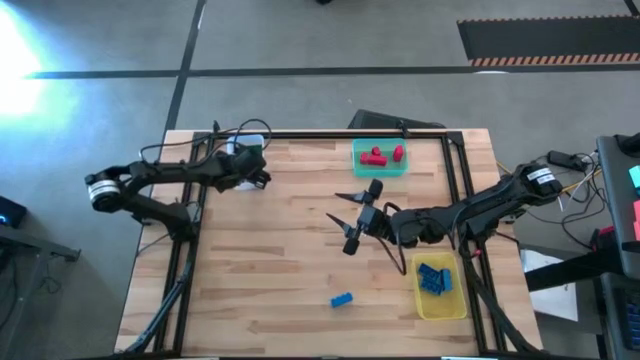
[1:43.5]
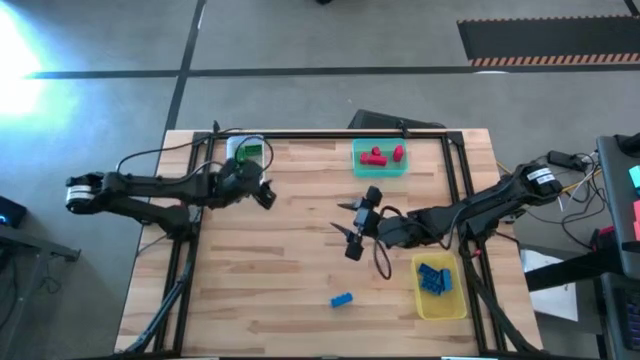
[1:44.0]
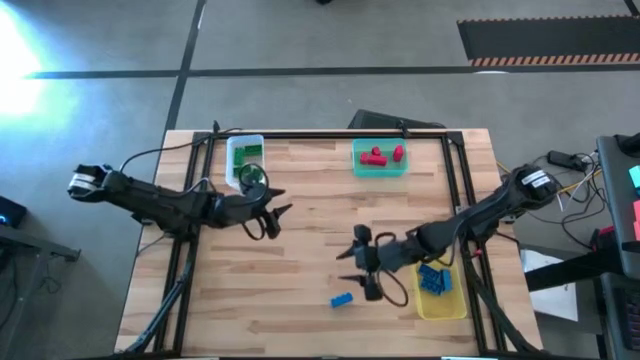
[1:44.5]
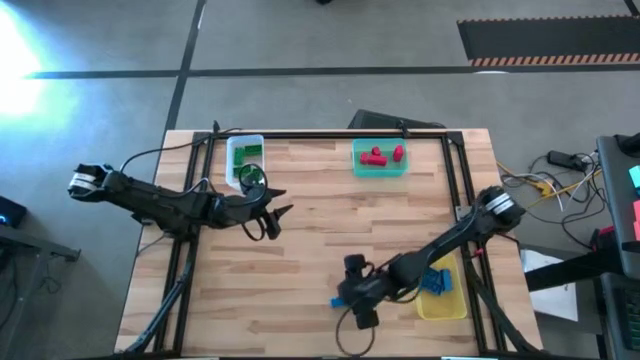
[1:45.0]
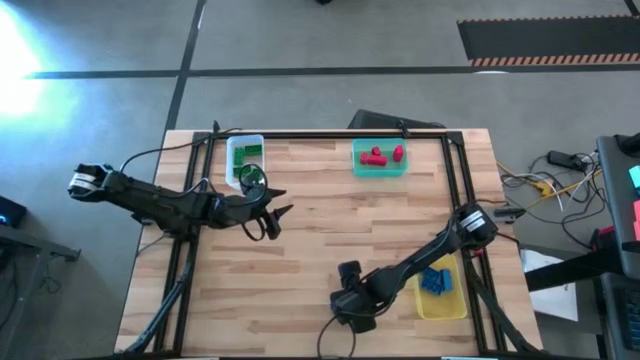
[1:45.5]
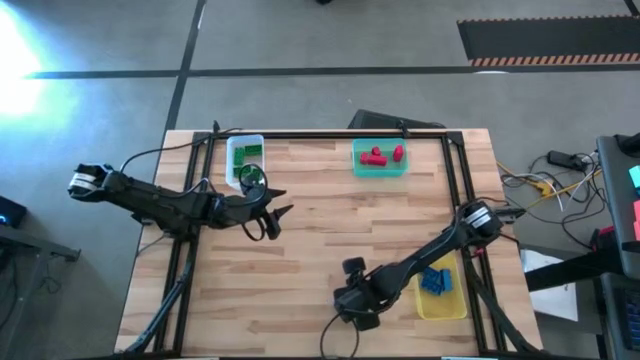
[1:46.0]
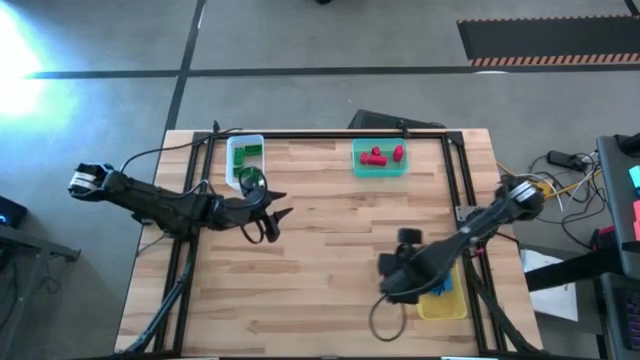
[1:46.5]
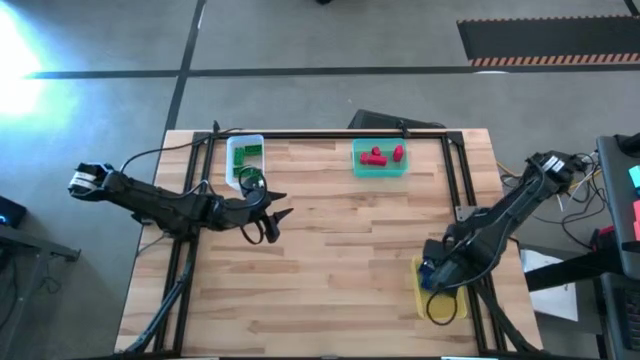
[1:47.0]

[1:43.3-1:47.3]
Task: Sort & place blocks by color
Put the blue game piece into the yellow bin

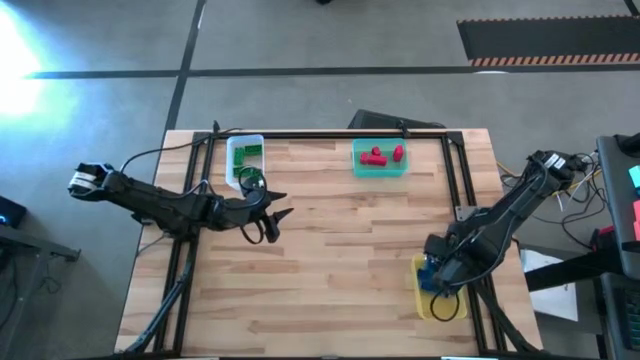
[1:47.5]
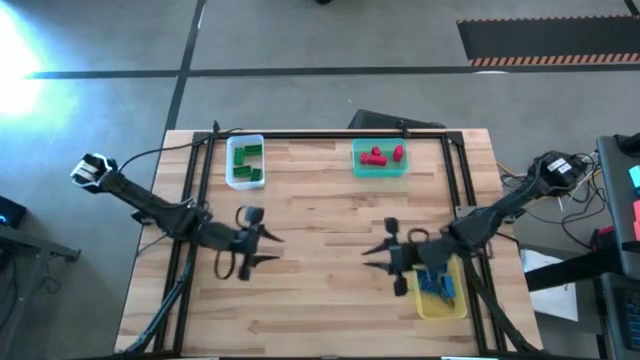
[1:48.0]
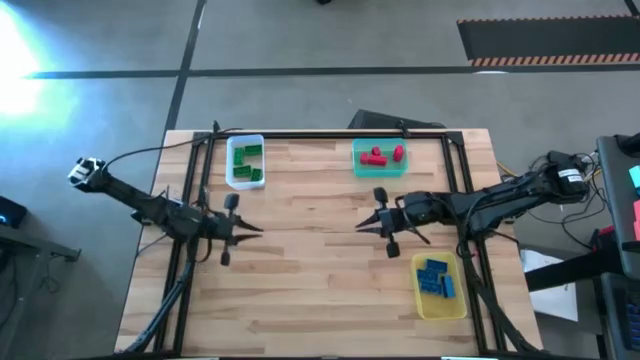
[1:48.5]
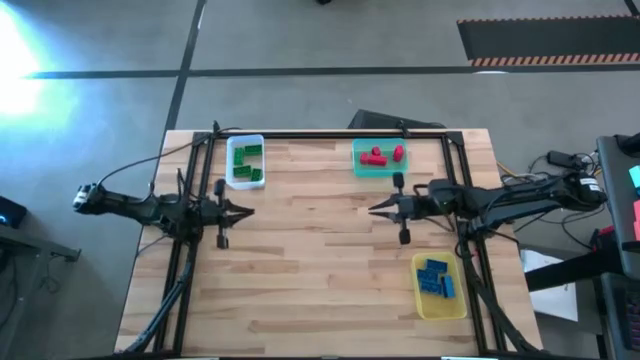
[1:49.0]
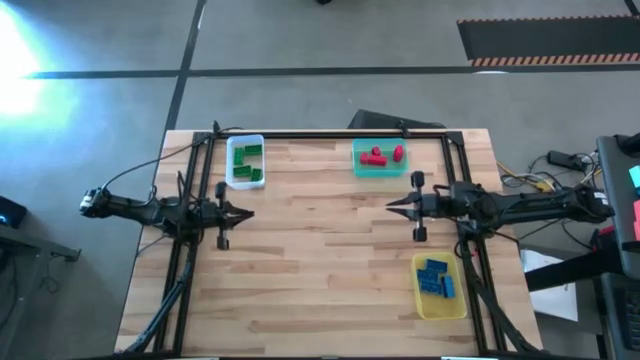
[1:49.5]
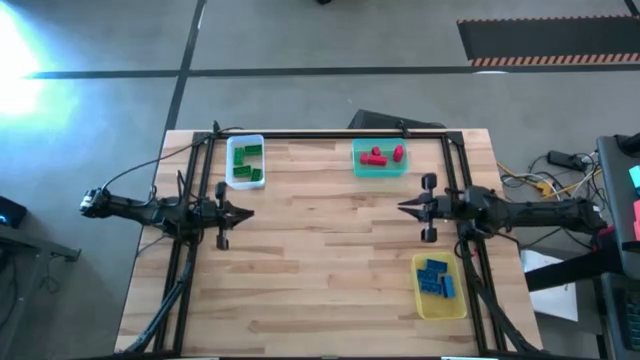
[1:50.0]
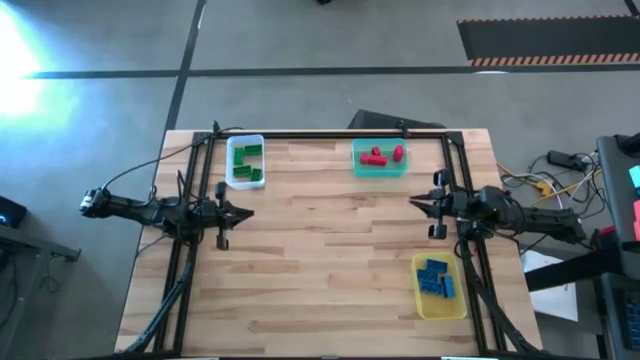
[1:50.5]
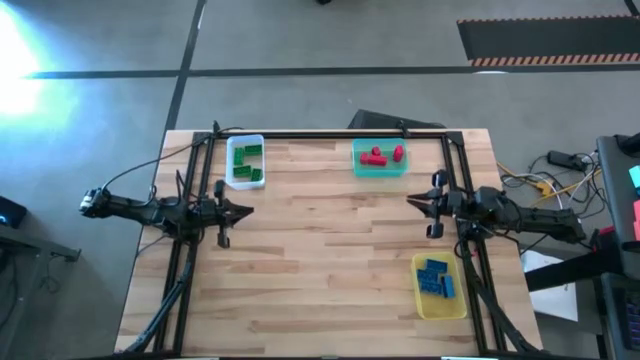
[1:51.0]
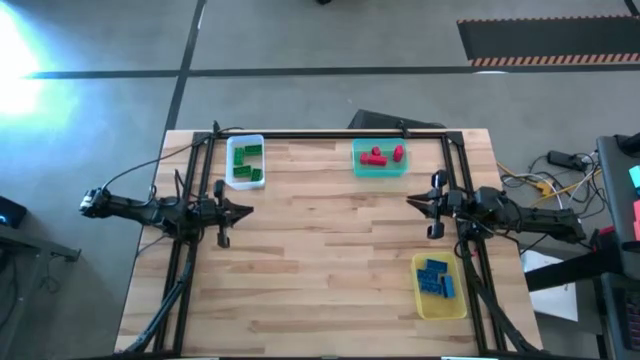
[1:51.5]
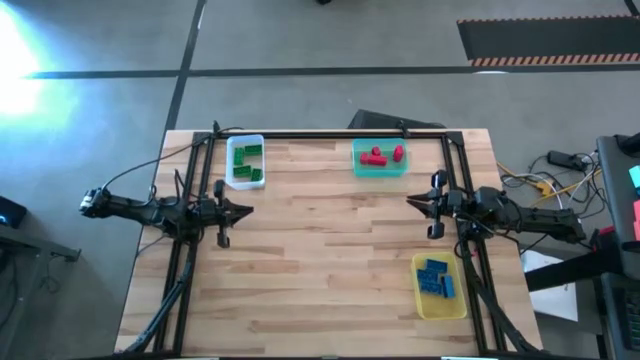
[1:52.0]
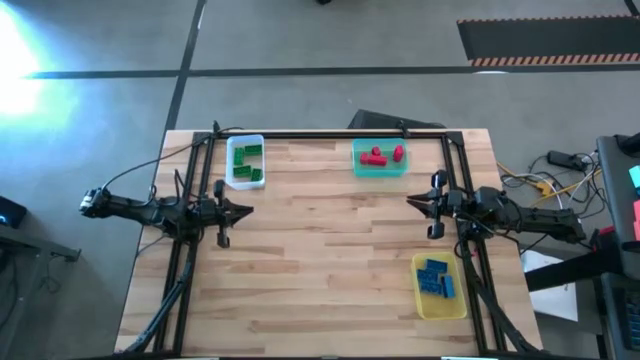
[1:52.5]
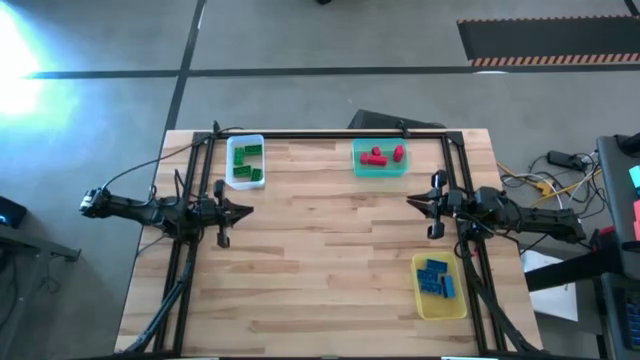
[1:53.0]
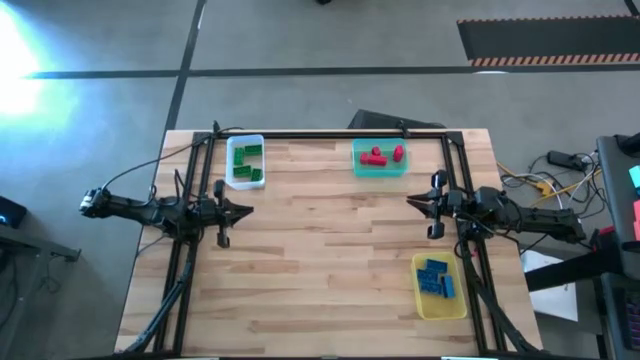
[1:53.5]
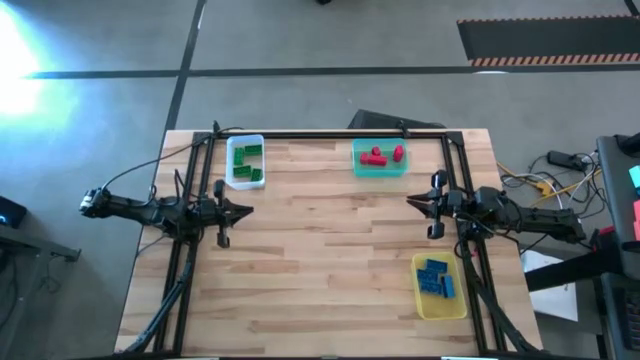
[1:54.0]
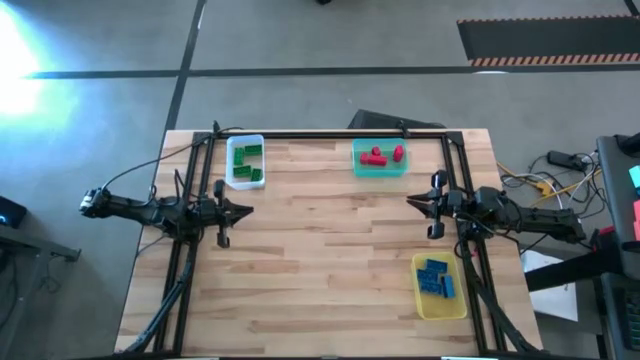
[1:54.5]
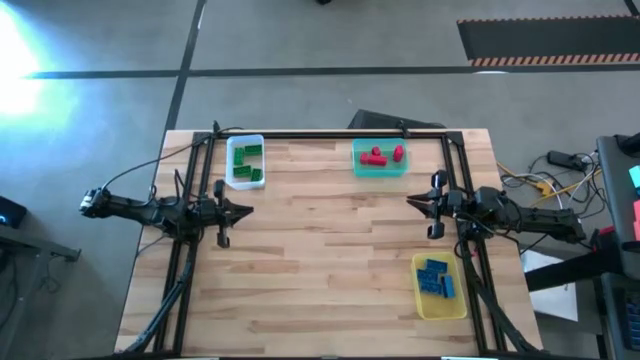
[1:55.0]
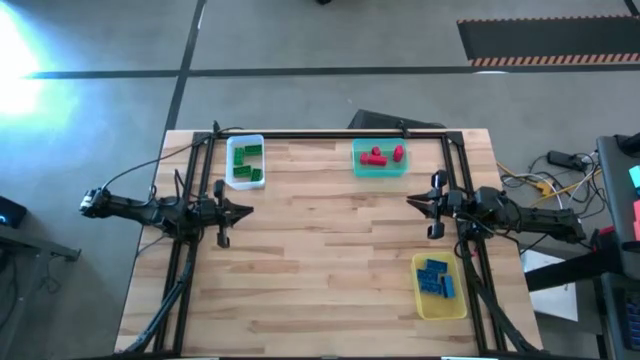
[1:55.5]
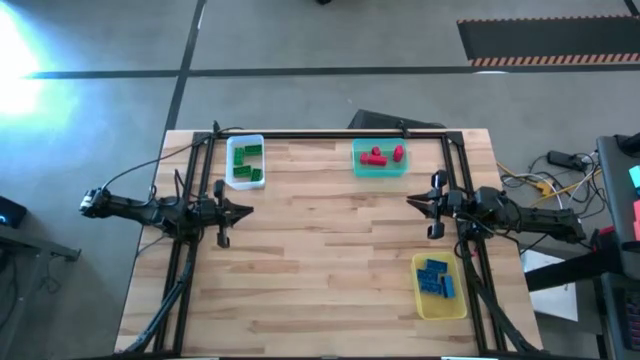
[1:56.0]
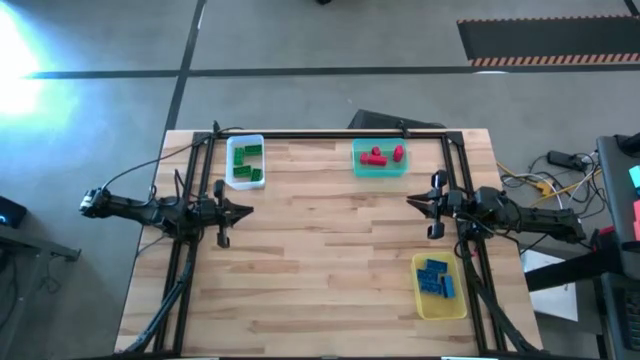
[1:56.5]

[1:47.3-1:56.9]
Return to Home Position

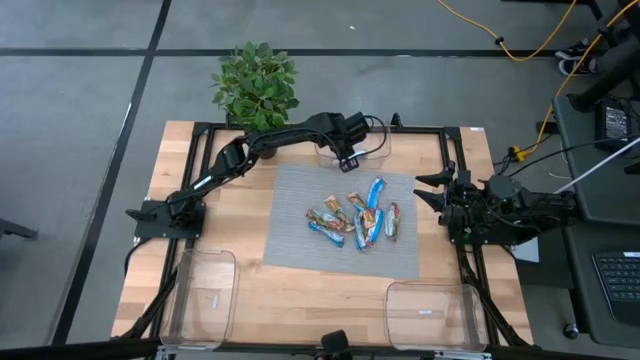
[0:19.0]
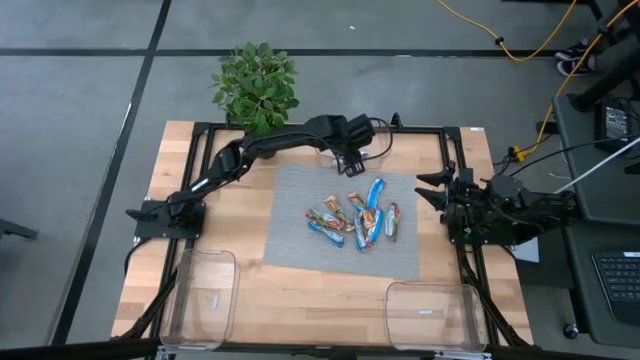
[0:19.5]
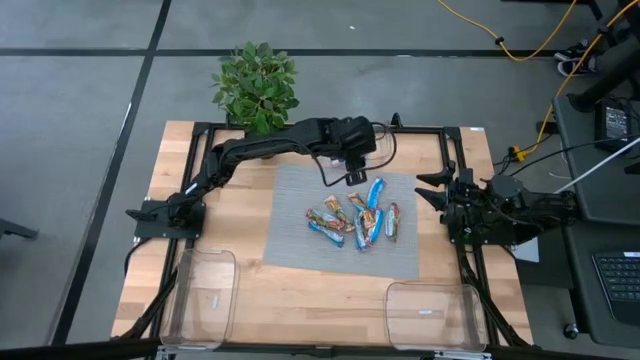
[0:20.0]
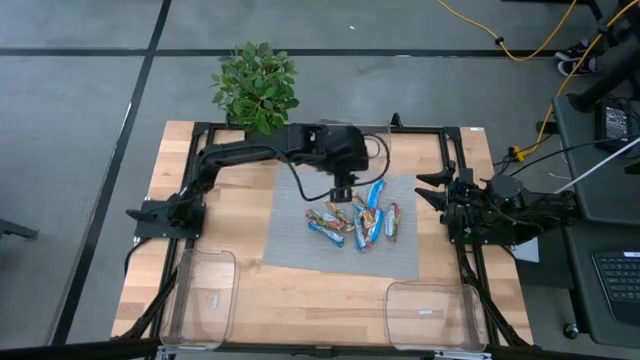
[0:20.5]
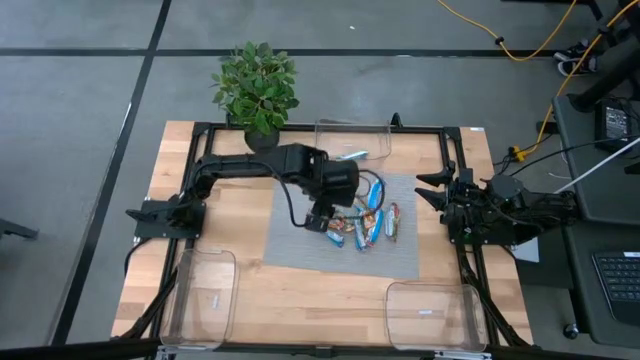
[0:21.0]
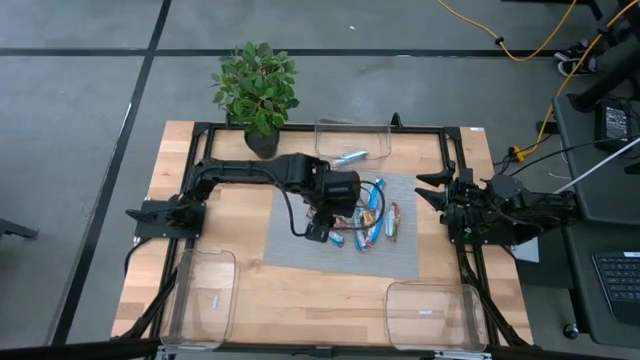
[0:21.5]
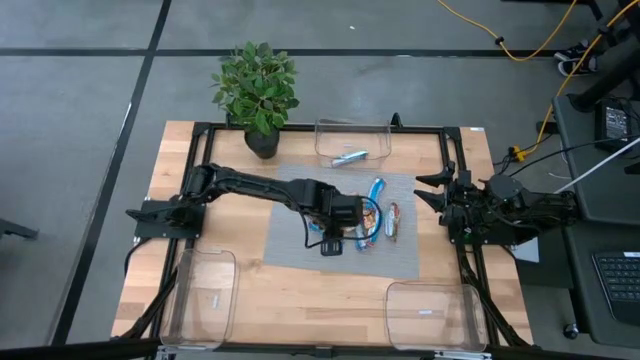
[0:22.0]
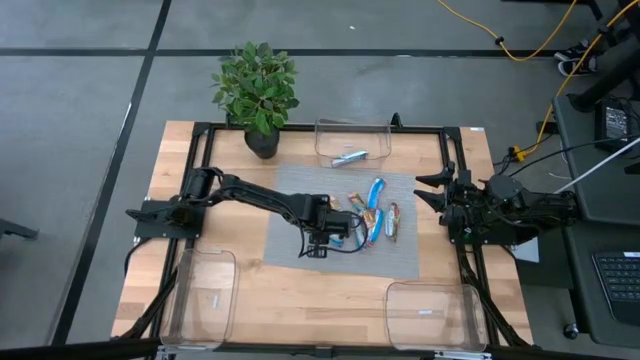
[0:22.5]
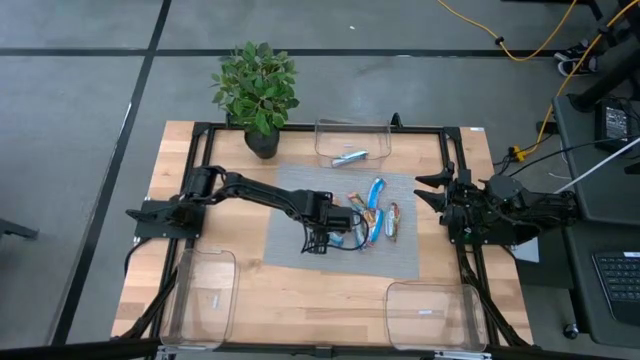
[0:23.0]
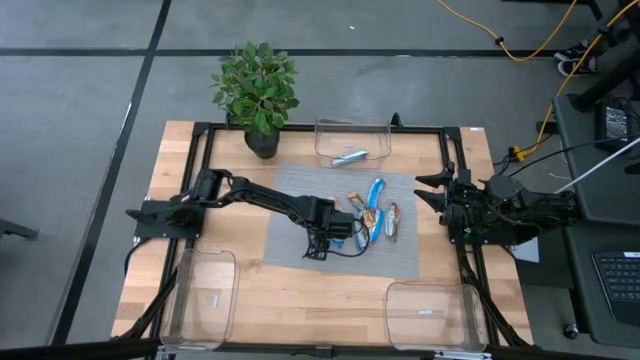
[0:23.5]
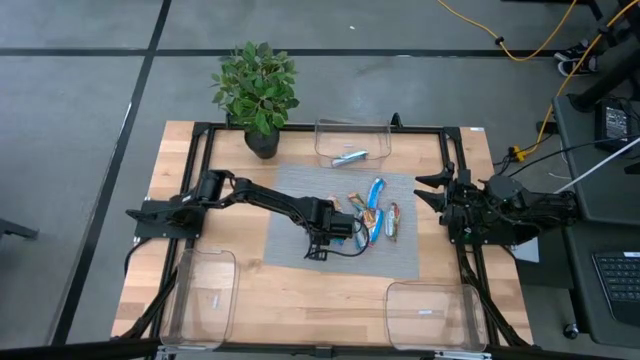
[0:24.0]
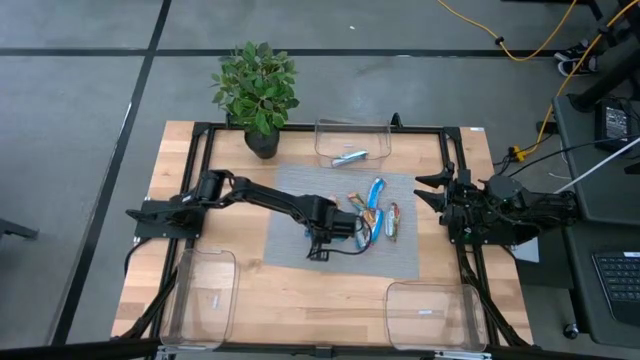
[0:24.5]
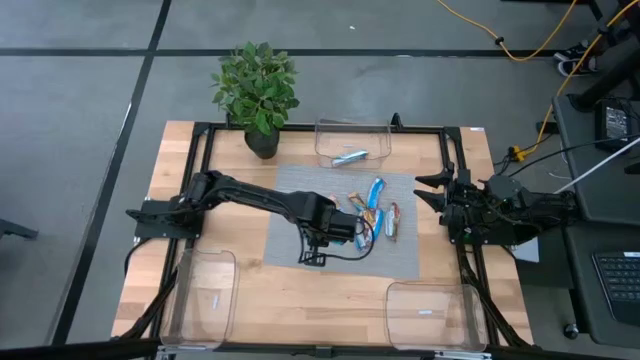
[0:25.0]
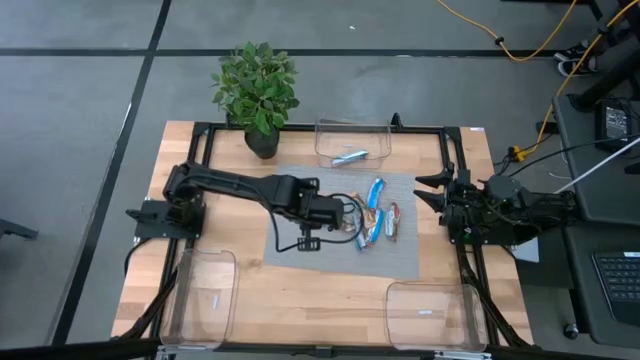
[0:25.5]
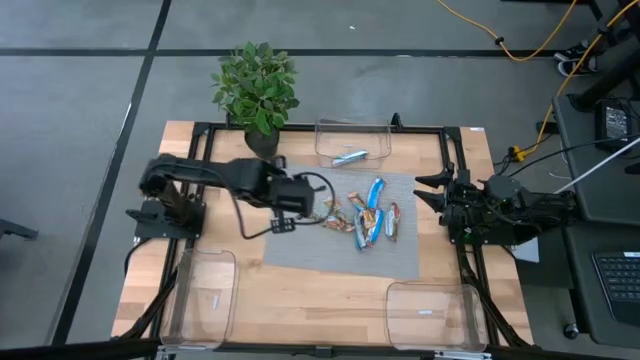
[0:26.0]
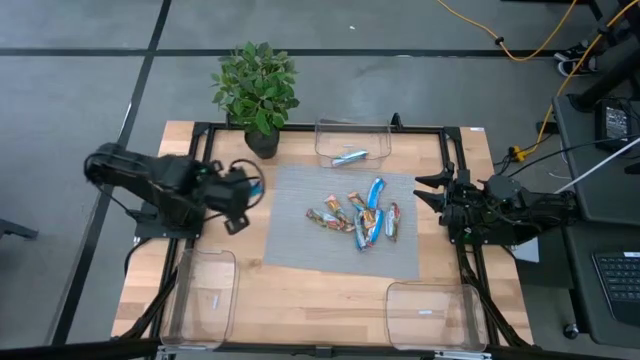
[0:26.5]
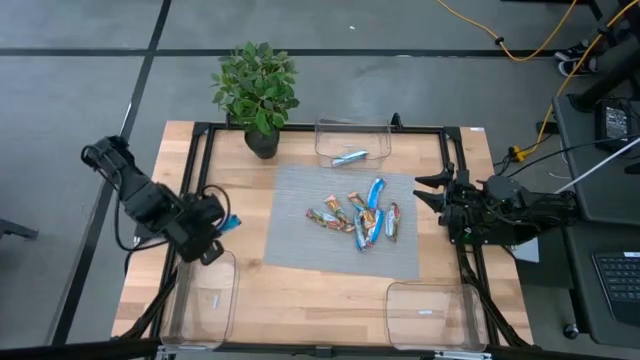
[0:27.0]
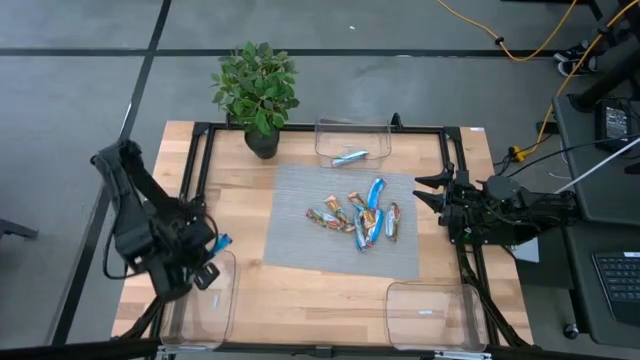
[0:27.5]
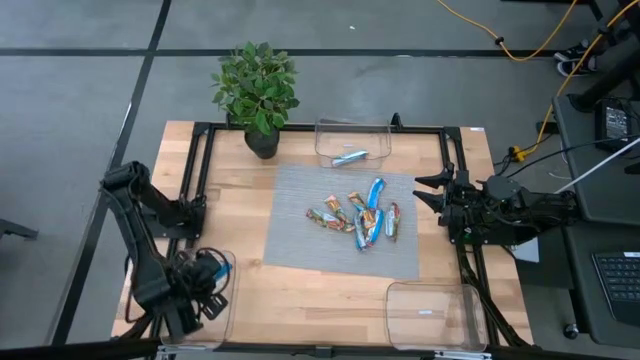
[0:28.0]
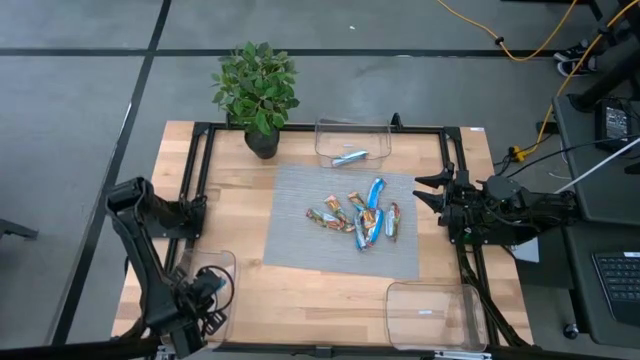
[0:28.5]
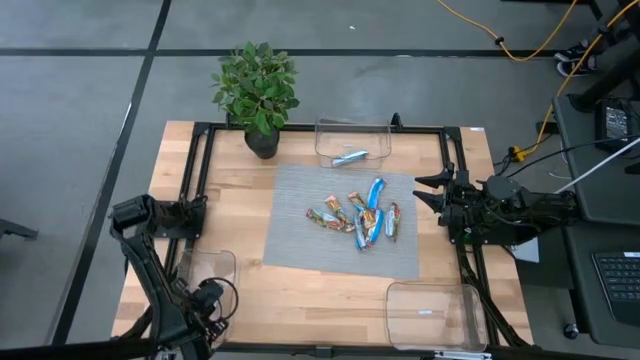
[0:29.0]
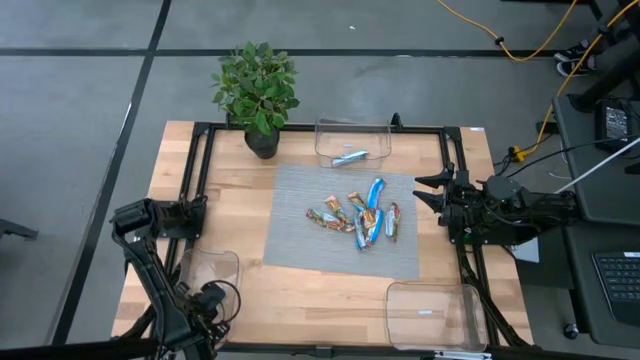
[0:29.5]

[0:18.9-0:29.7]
Task: Pick and place Granola Bars by type
Put the blue granola bar into the bottom left transparent bin
